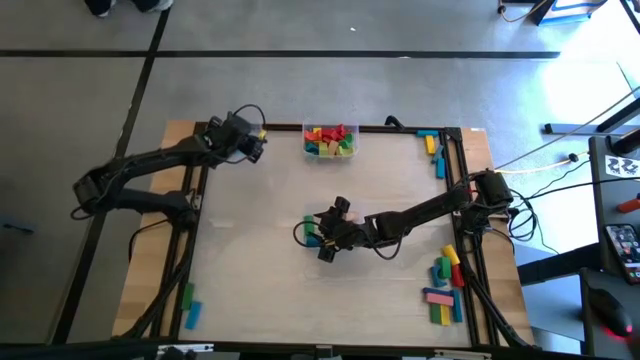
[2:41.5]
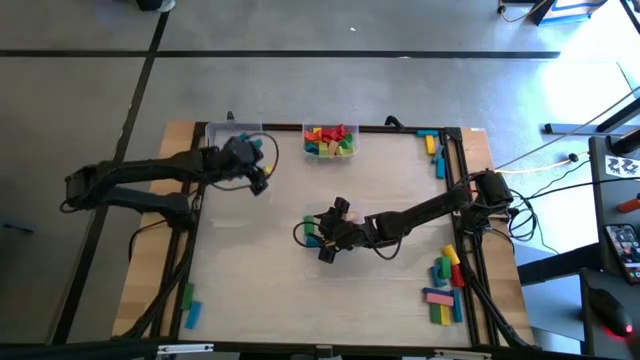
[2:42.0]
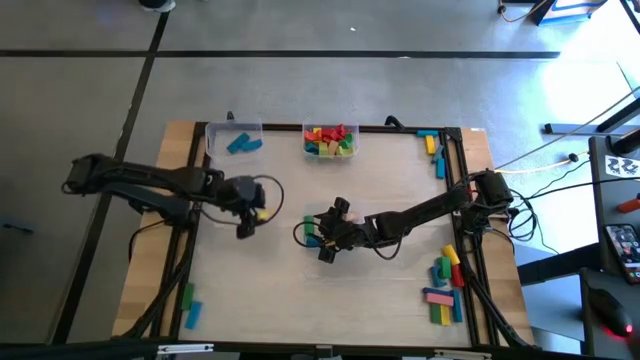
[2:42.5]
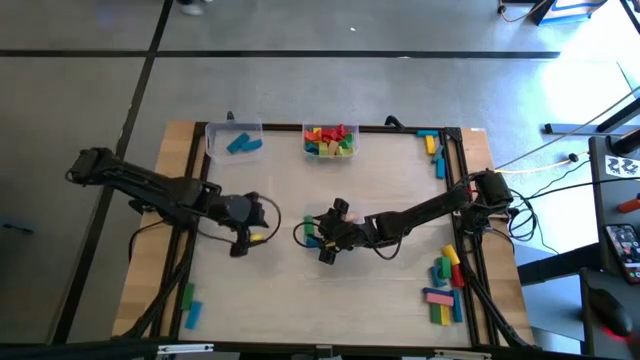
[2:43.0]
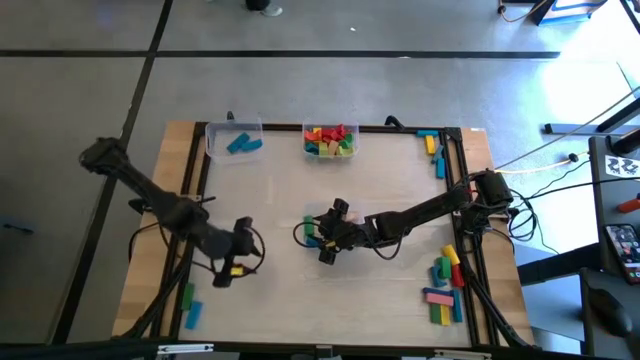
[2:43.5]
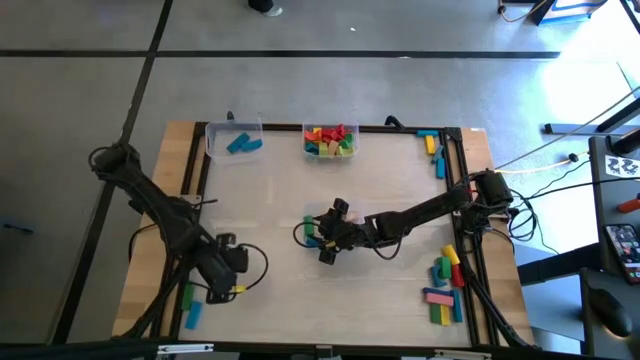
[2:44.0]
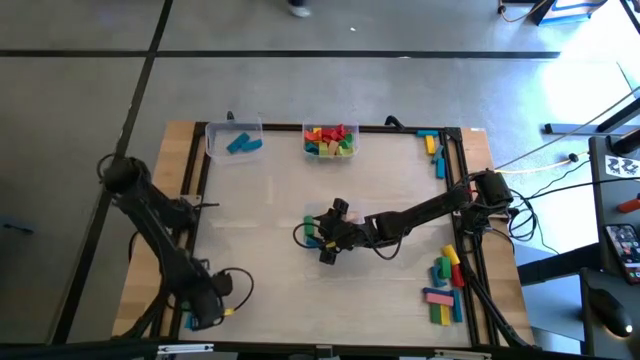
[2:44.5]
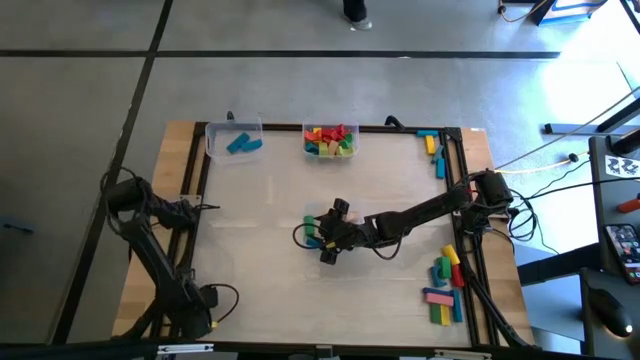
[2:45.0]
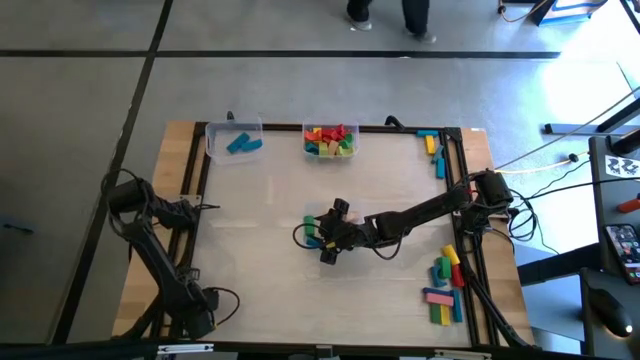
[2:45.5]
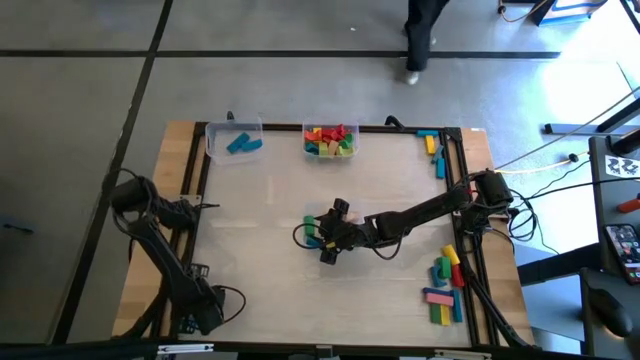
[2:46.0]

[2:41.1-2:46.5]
Task: Sort blocks by size
Adjust the rectangular green block to the middle left of the table

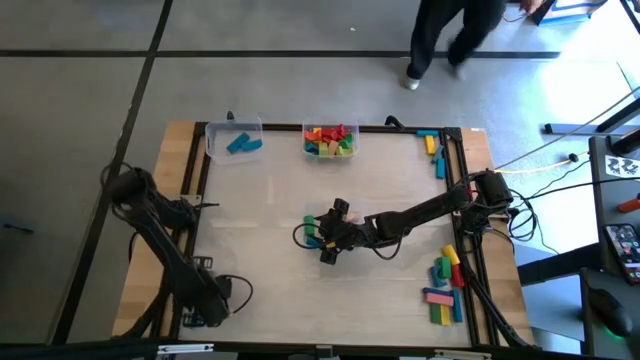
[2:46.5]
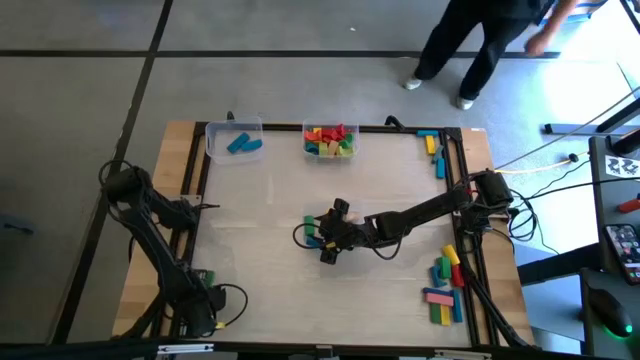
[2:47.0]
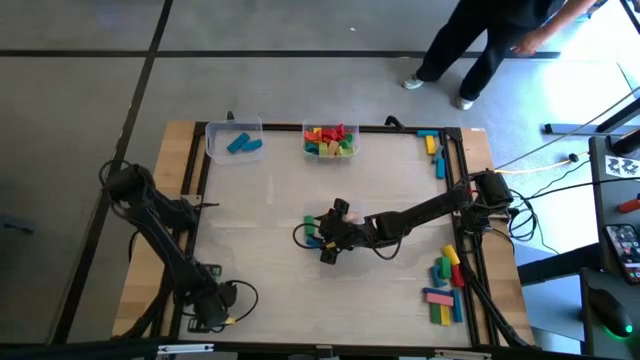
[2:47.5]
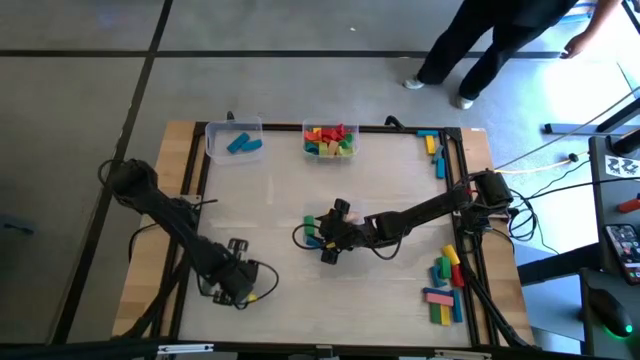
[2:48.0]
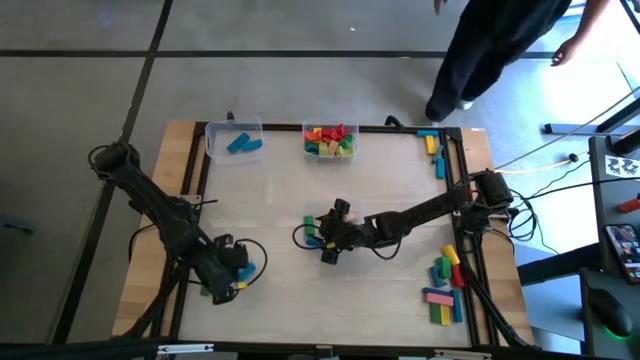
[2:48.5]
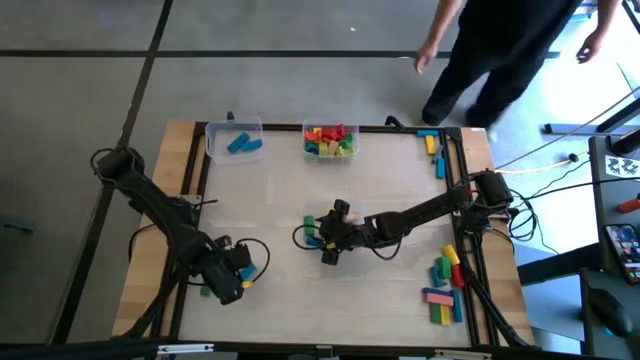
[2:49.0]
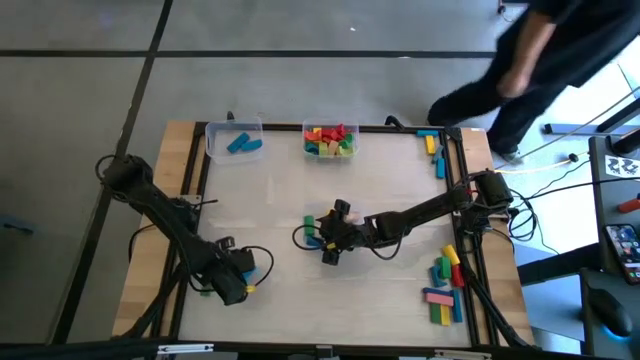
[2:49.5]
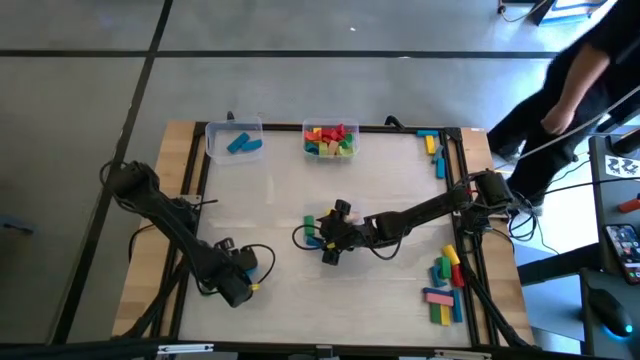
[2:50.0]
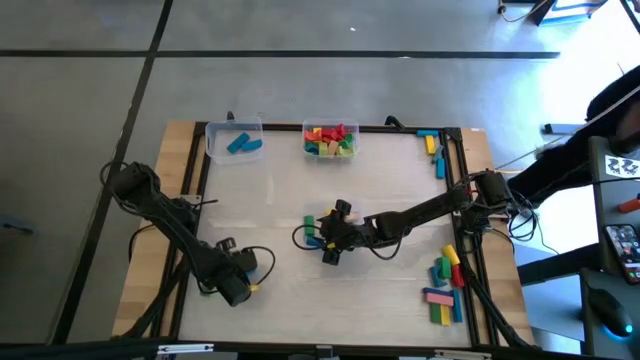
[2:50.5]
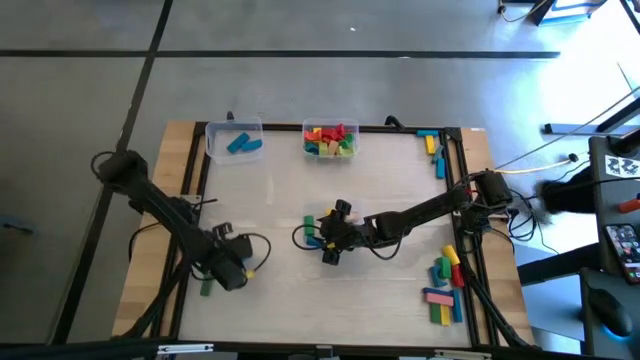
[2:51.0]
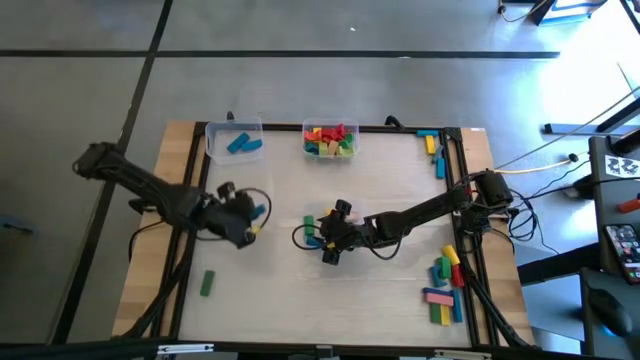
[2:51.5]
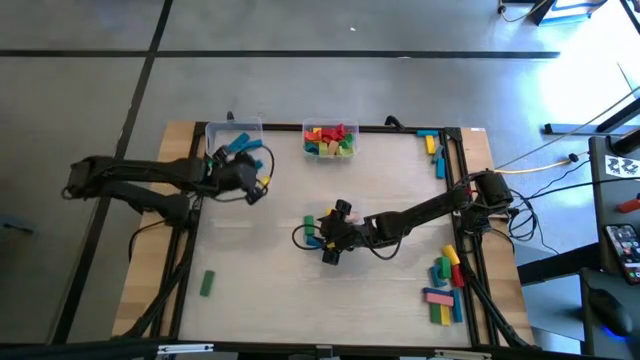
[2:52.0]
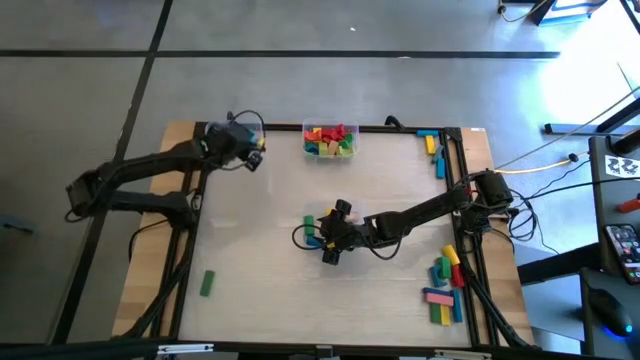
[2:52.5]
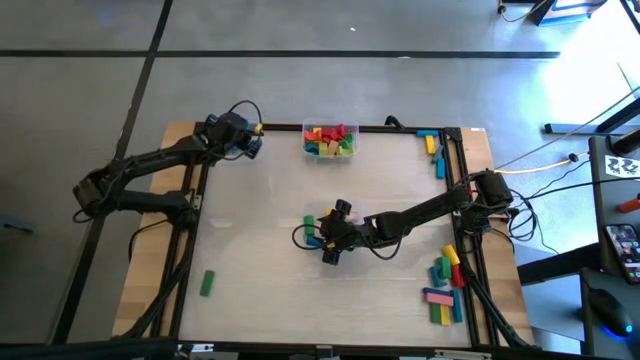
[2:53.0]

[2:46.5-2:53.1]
Put the blue rectangular block into the top left transparent bin

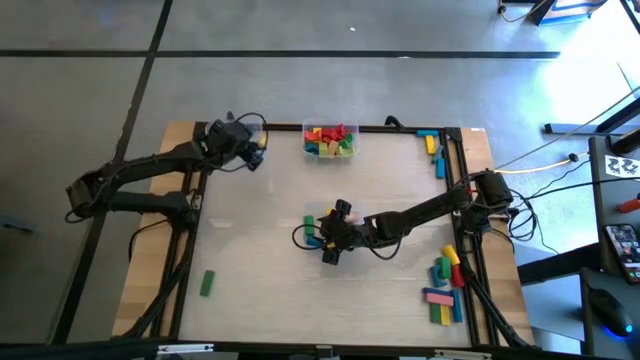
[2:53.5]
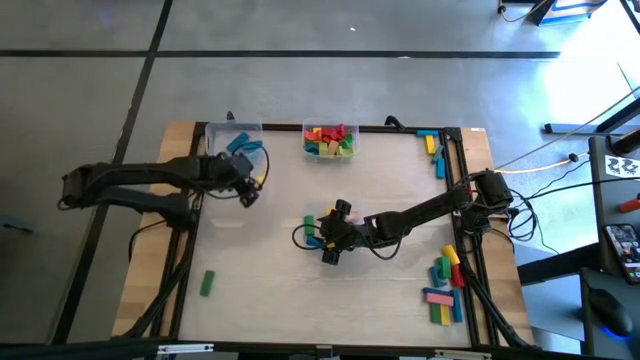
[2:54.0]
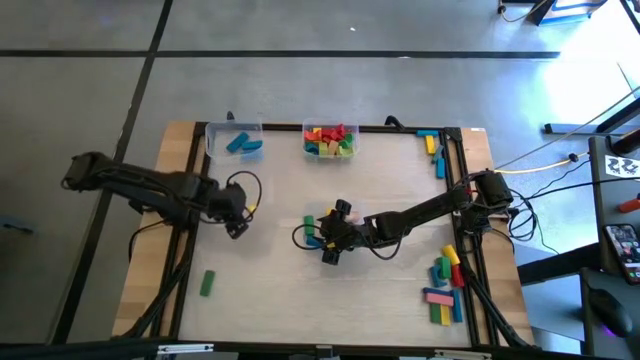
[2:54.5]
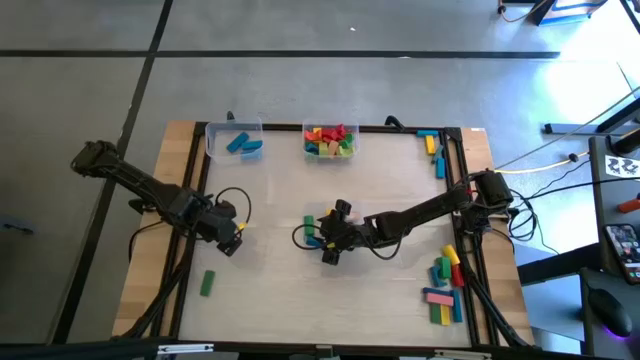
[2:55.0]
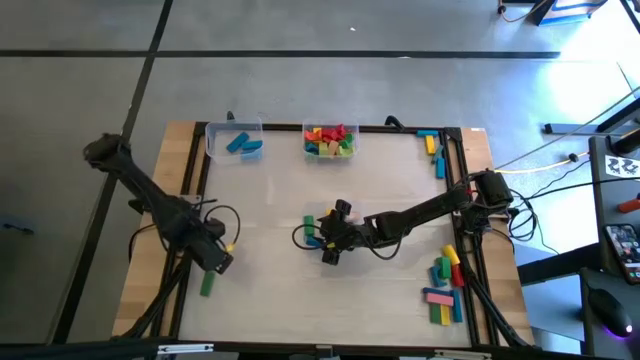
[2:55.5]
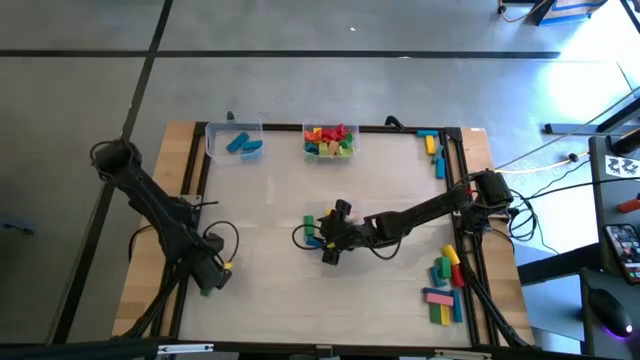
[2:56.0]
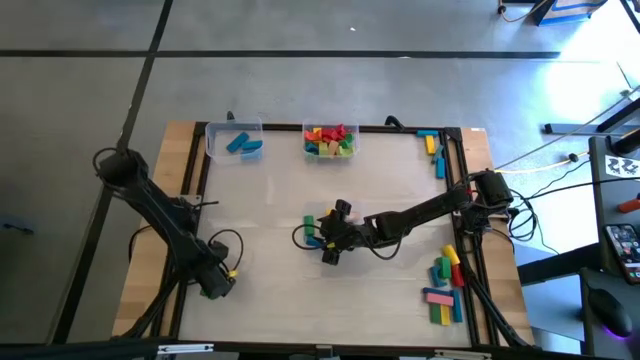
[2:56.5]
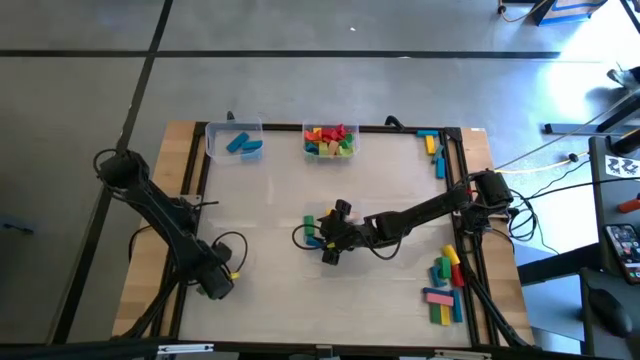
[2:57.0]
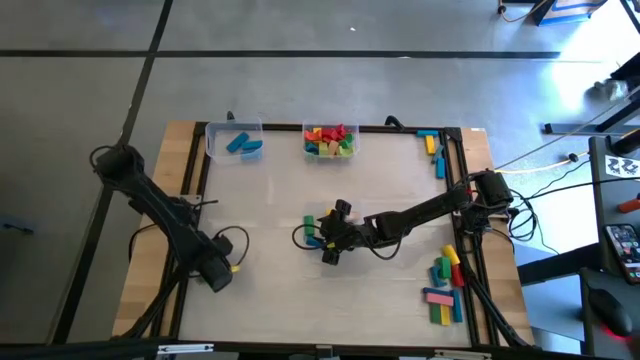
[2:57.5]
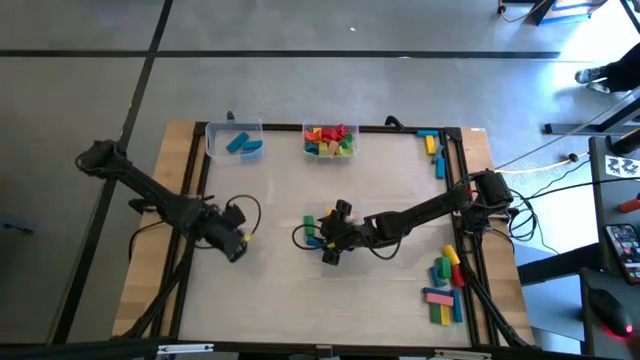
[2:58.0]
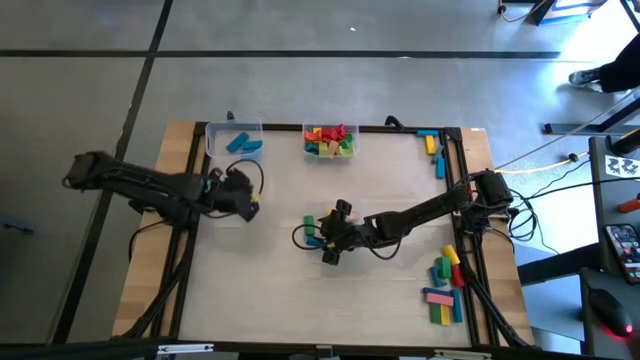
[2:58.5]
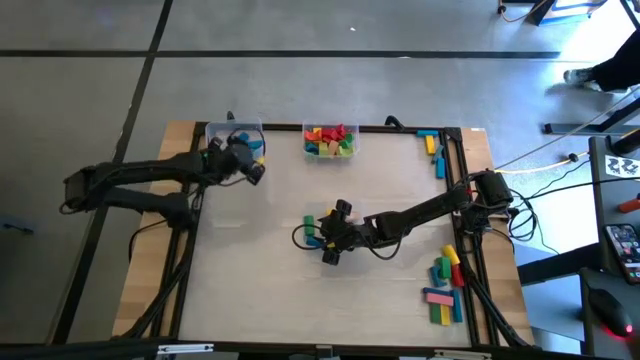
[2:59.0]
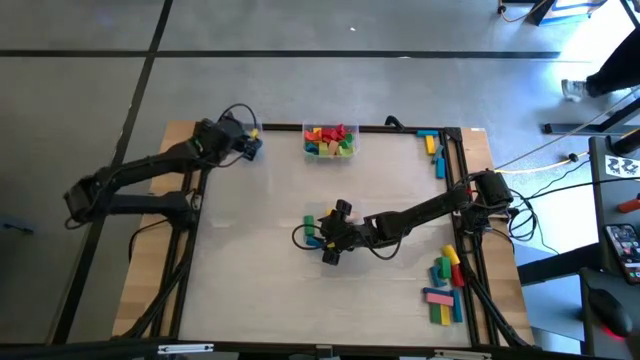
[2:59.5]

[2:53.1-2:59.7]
Put the green rectangular block into the top left transparent bin

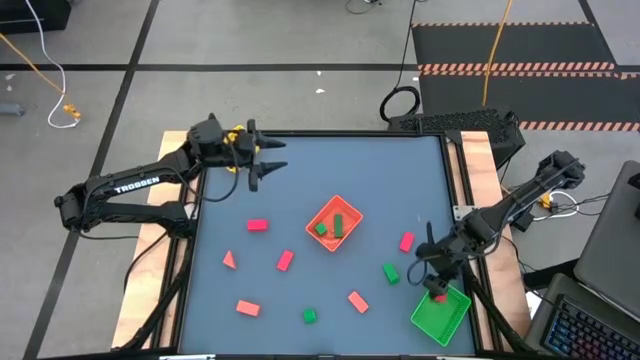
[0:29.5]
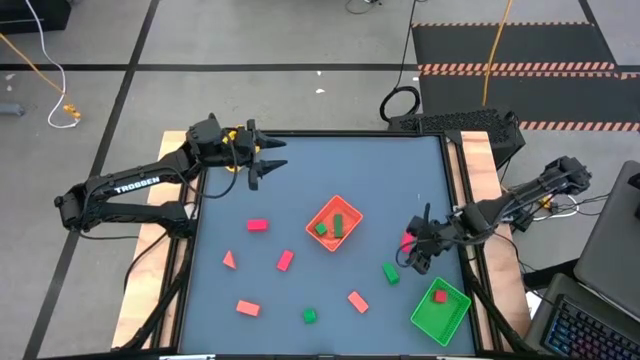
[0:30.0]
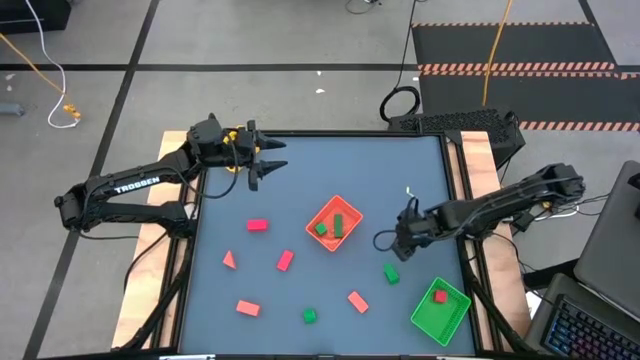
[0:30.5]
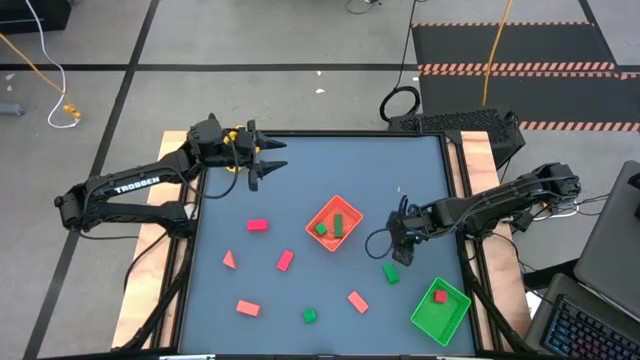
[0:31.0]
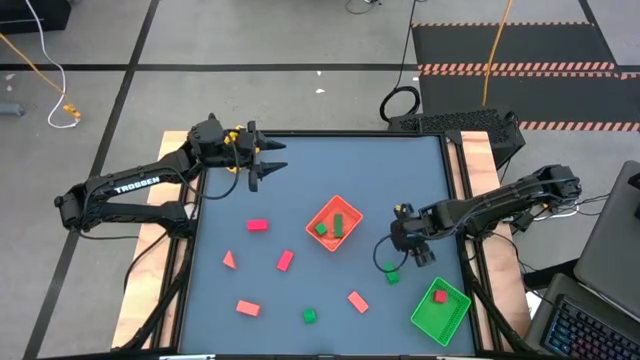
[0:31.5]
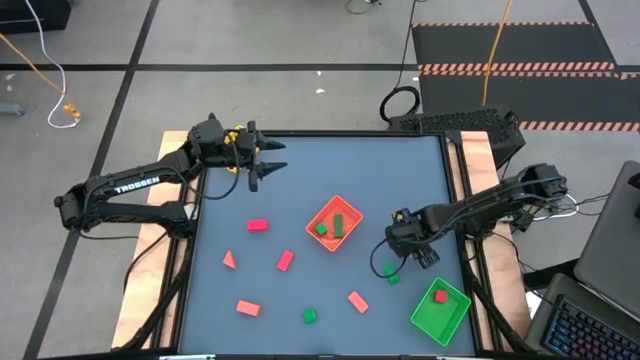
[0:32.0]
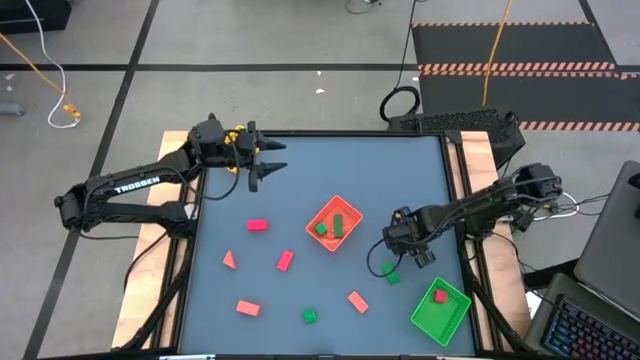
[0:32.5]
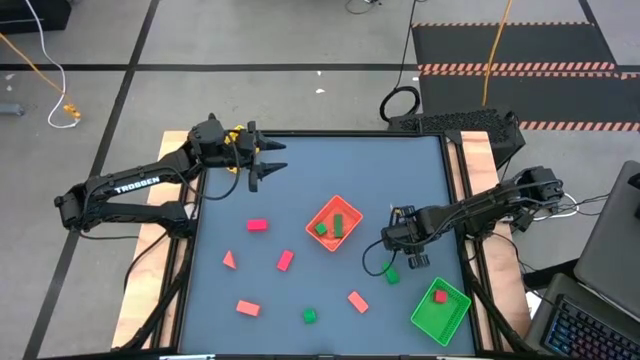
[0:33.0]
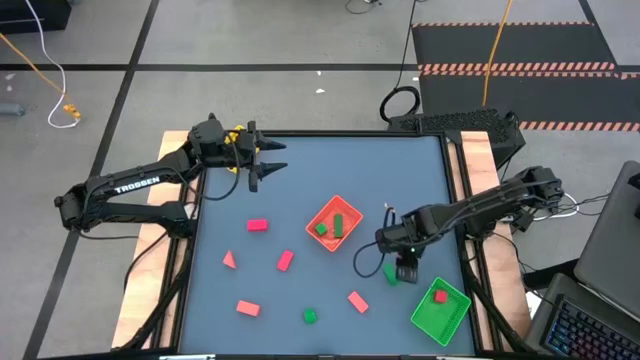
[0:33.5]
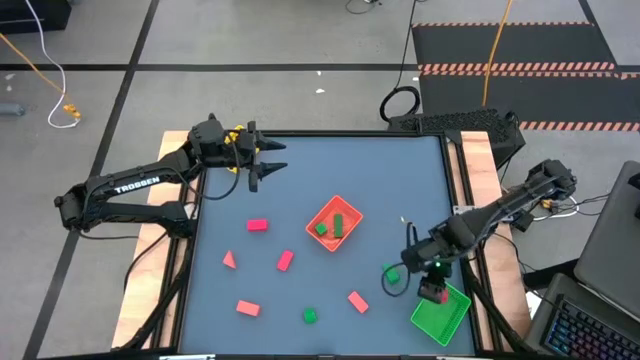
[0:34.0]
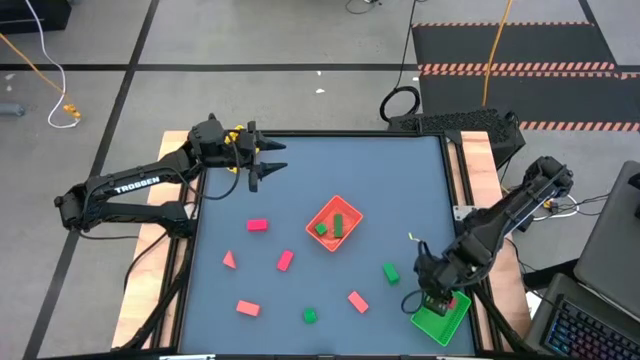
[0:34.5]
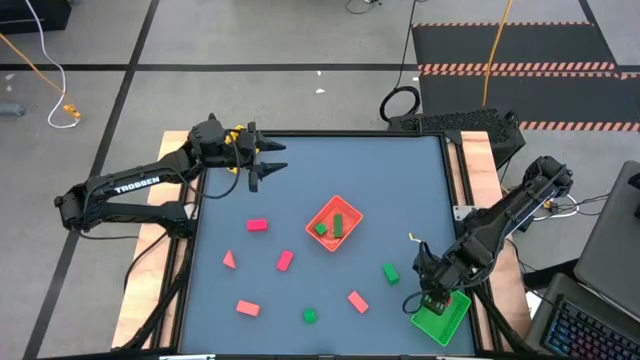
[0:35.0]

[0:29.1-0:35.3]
Task: Sort & place blocks by color
Put the red block into the green bin
